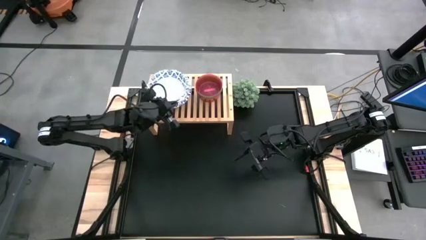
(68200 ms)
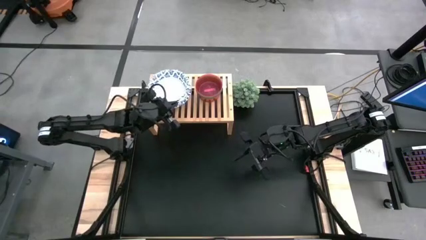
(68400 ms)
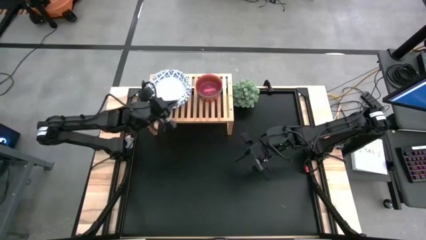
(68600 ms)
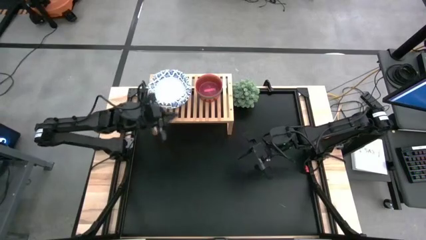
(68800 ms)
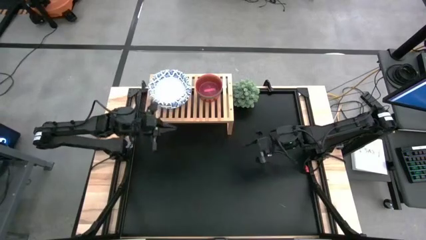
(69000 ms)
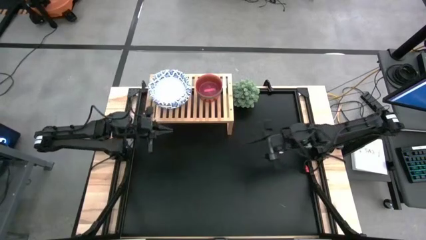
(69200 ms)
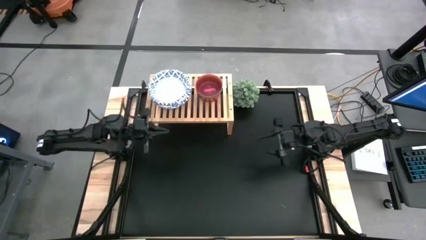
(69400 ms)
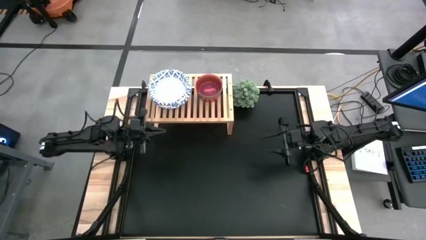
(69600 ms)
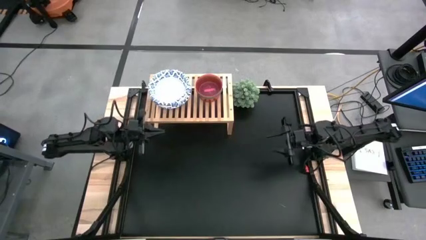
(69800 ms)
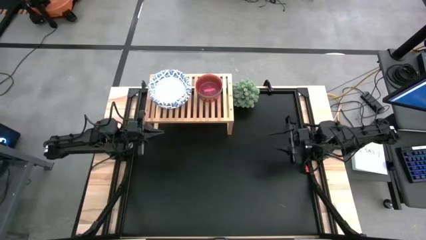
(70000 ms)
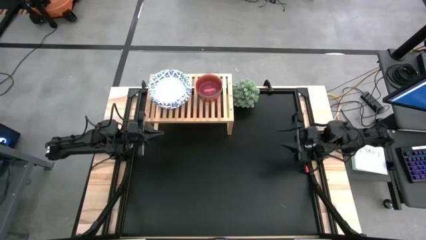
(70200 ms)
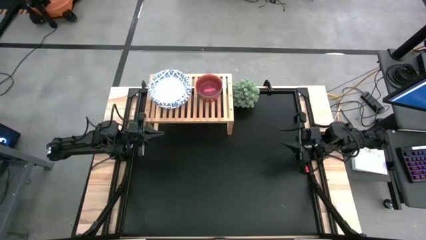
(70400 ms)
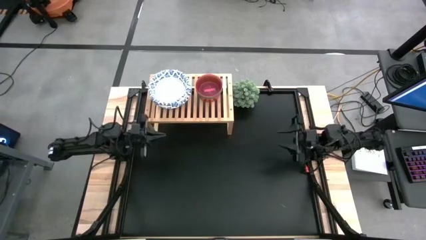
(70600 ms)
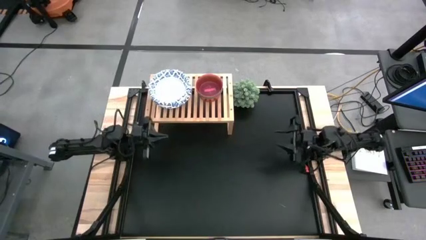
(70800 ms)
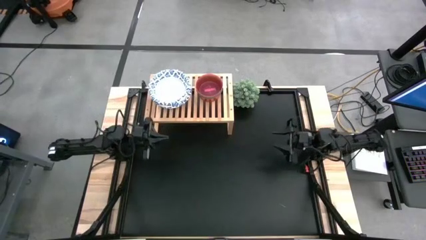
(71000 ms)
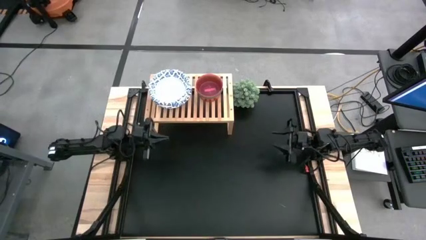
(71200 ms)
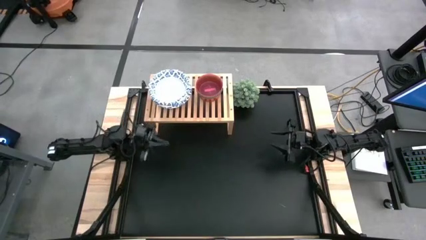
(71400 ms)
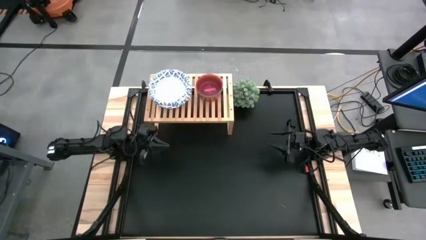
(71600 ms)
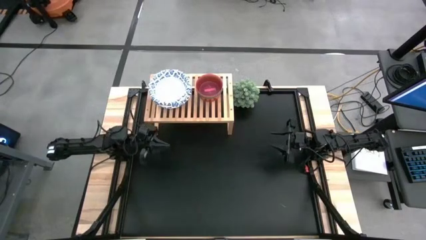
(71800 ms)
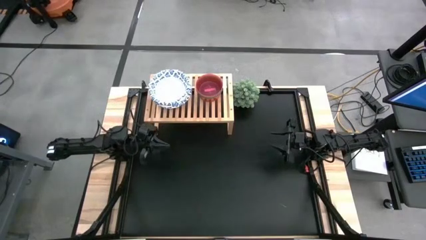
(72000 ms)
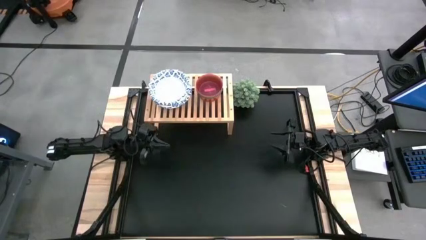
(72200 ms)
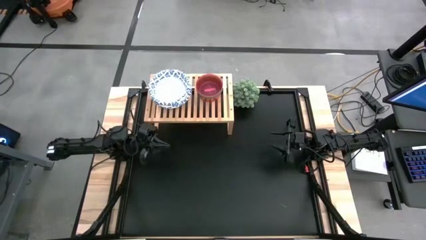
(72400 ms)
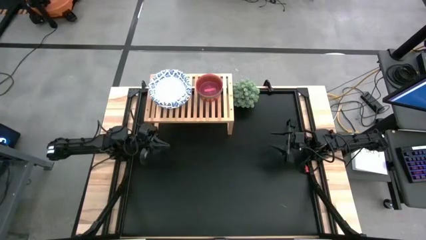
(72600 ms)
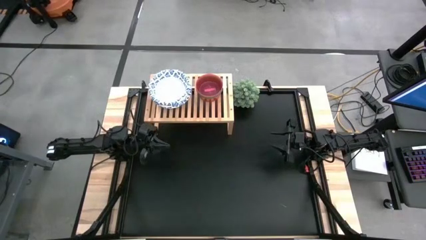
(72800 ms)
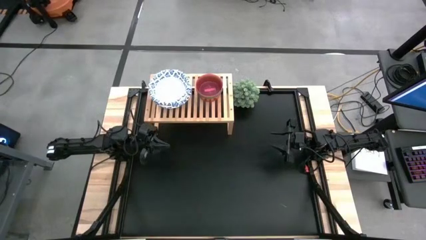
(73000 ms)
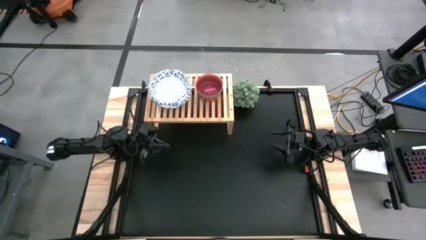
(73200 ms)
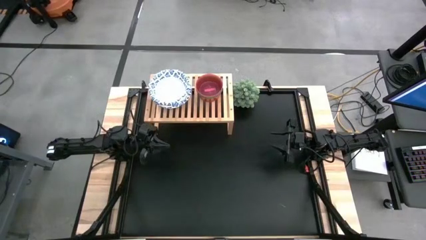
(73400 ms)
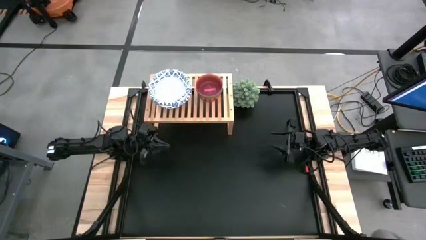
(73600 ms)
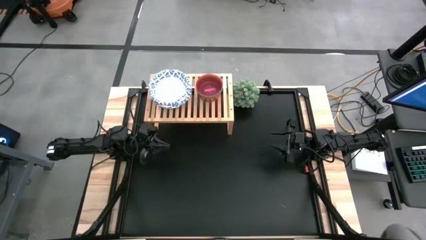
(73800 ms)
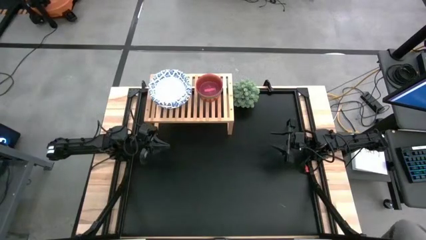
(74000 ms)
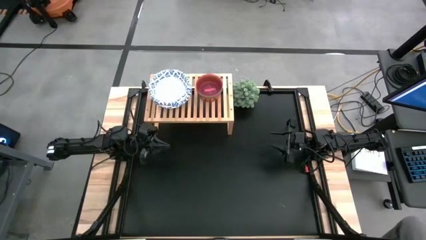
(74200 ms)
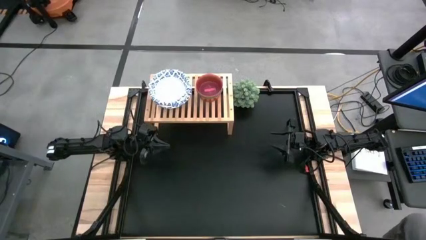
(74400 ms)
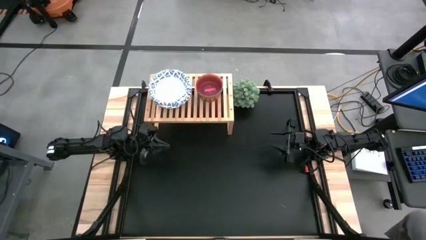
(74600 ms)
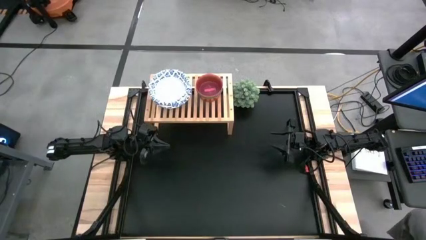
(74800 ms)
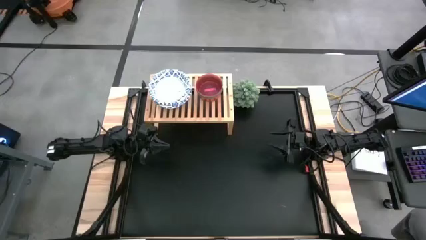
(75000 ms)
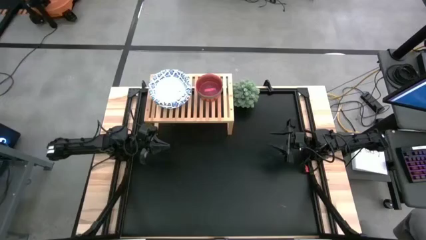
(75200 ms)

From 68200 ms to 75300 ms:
Task: Place and stack bowls onto a shelf
Return to Home Position

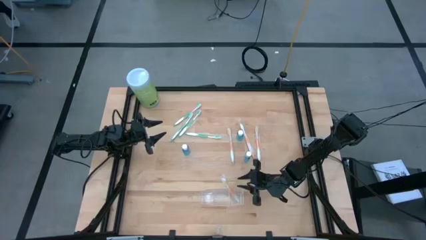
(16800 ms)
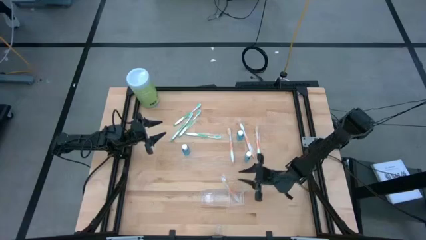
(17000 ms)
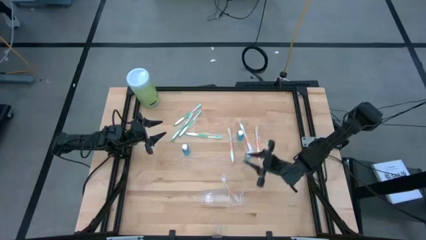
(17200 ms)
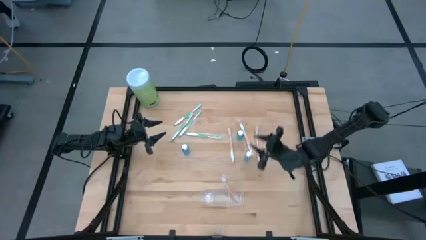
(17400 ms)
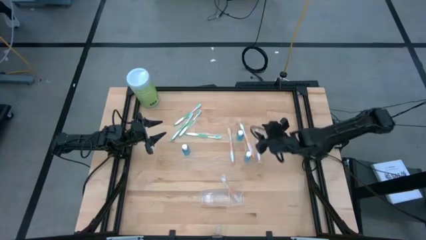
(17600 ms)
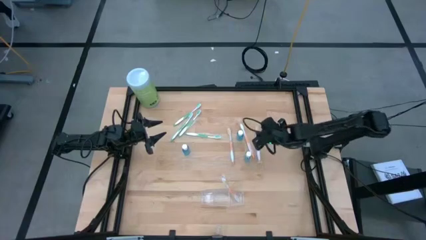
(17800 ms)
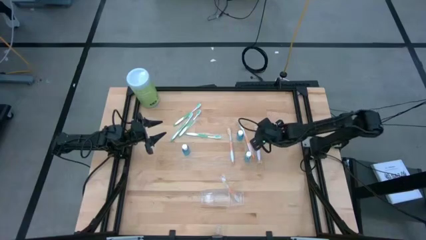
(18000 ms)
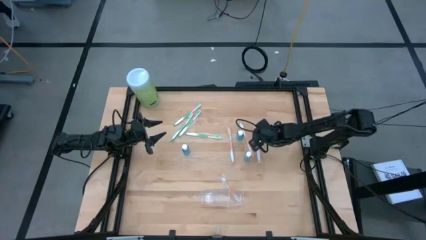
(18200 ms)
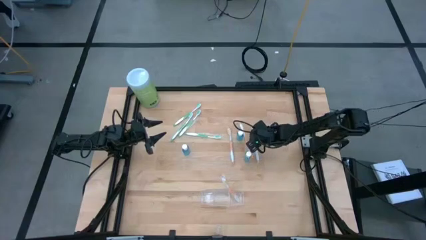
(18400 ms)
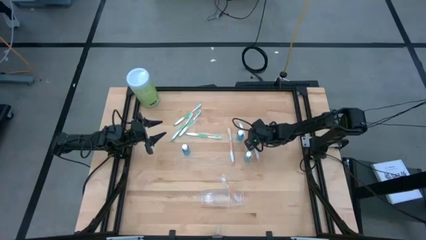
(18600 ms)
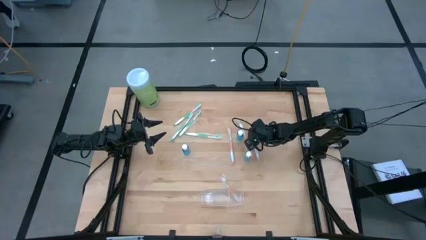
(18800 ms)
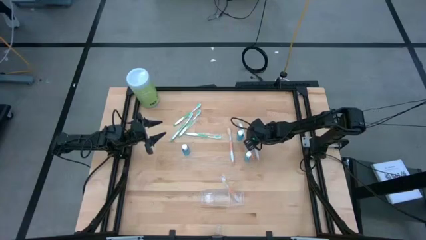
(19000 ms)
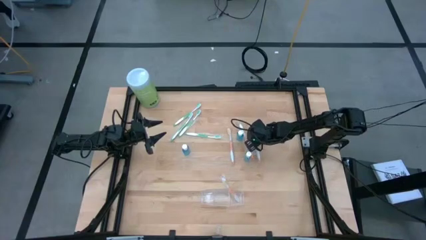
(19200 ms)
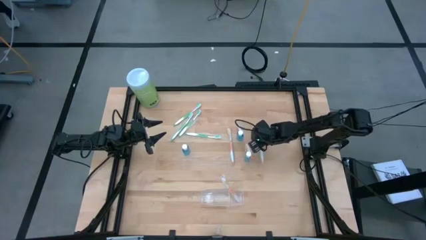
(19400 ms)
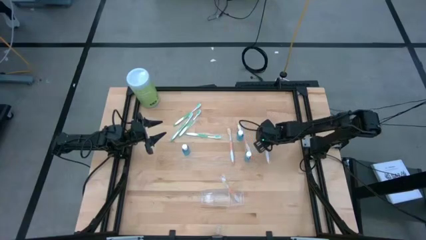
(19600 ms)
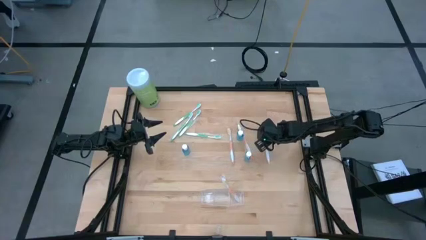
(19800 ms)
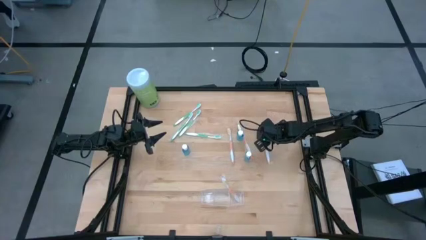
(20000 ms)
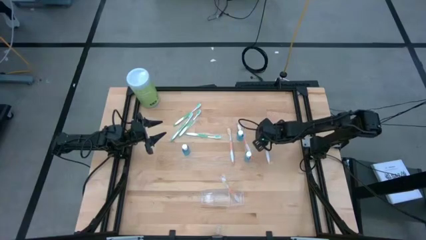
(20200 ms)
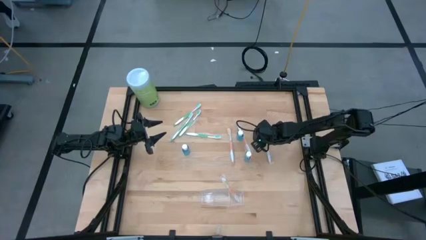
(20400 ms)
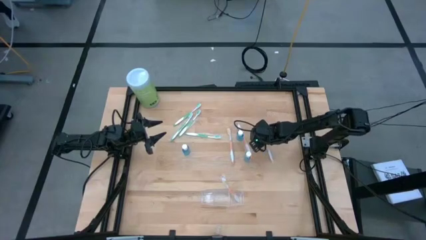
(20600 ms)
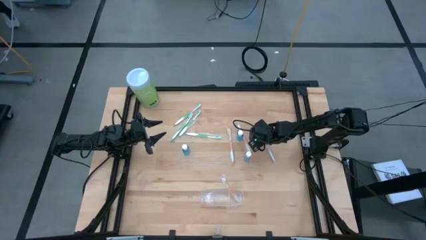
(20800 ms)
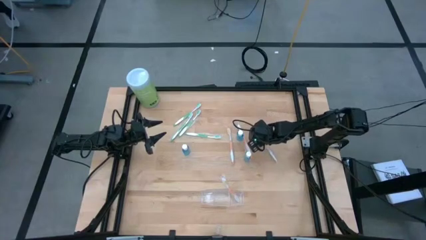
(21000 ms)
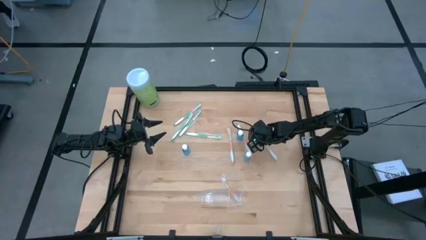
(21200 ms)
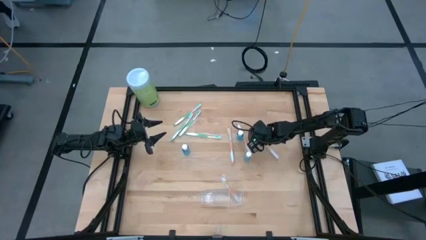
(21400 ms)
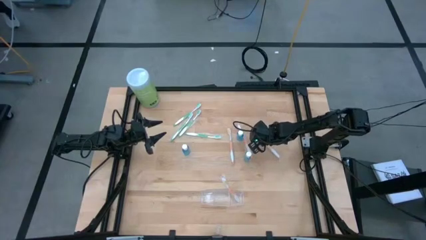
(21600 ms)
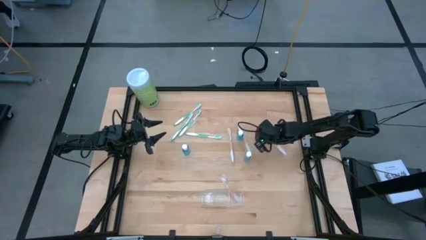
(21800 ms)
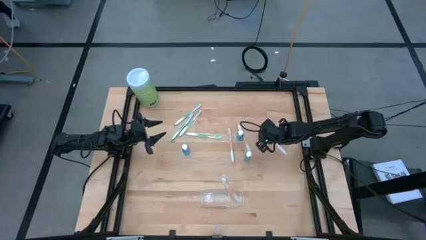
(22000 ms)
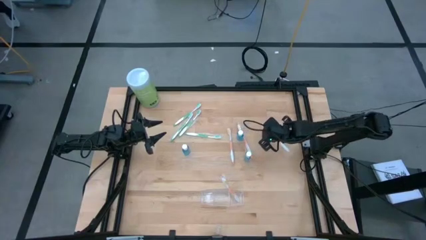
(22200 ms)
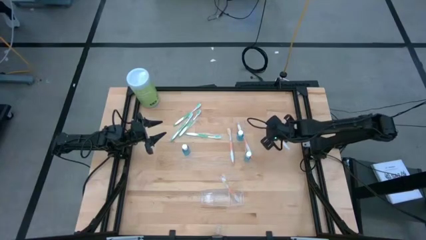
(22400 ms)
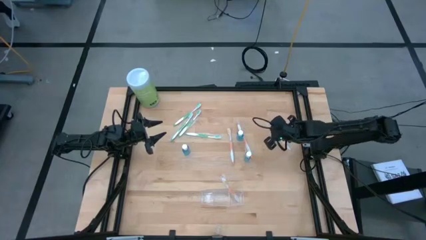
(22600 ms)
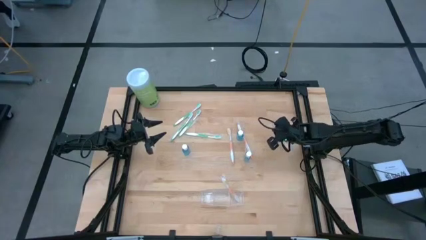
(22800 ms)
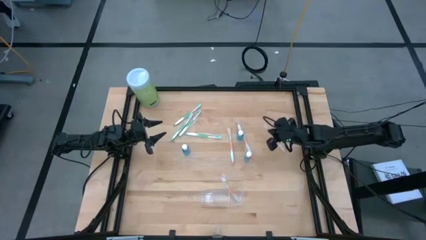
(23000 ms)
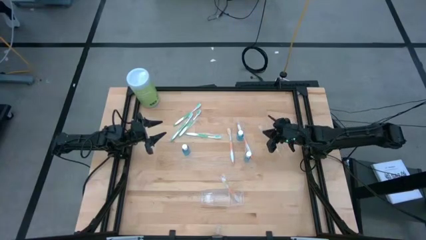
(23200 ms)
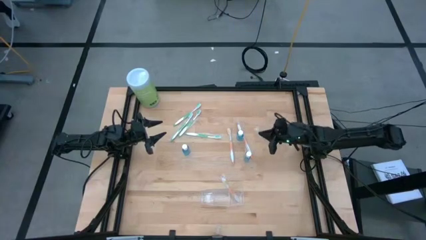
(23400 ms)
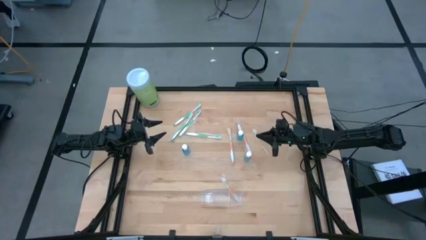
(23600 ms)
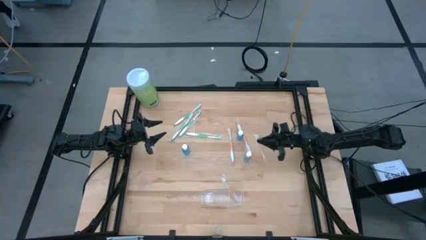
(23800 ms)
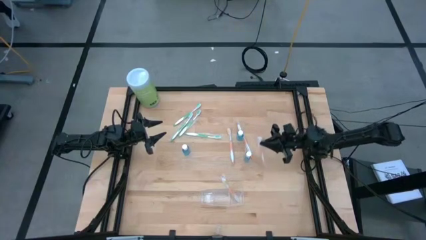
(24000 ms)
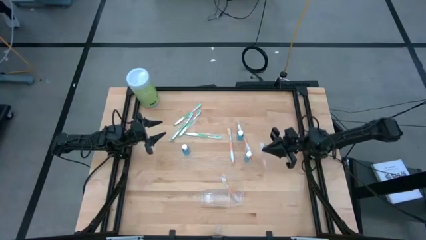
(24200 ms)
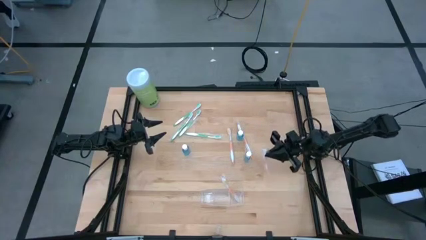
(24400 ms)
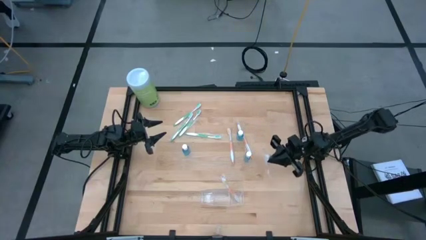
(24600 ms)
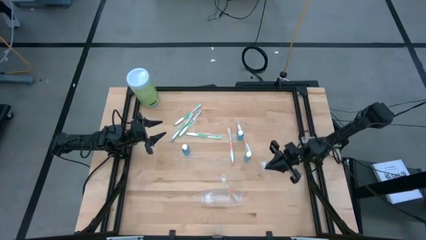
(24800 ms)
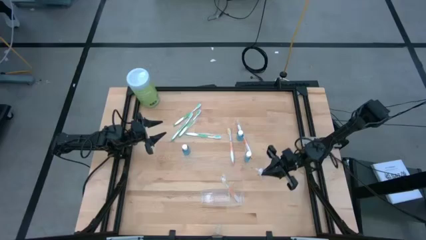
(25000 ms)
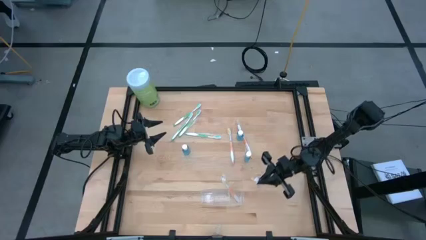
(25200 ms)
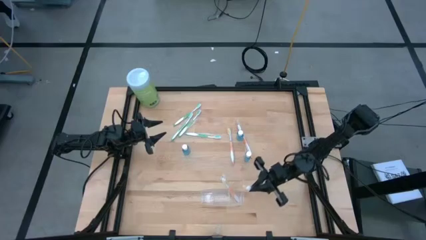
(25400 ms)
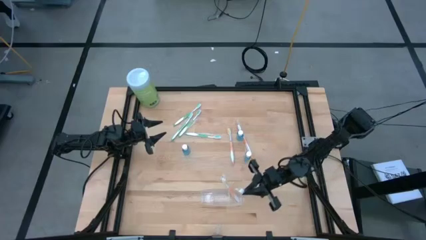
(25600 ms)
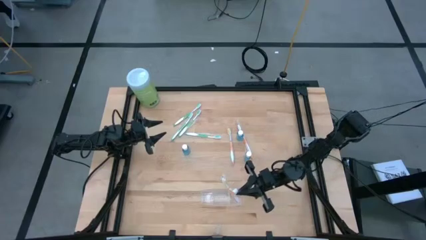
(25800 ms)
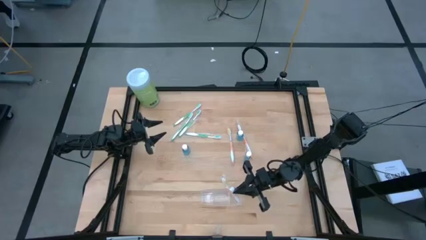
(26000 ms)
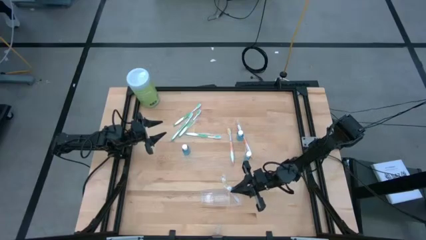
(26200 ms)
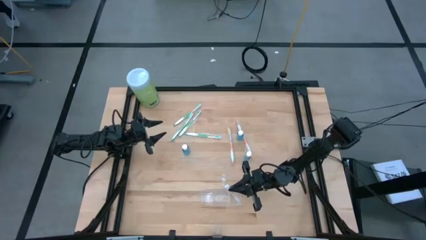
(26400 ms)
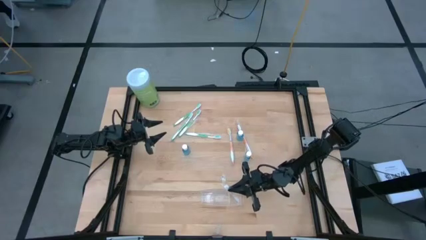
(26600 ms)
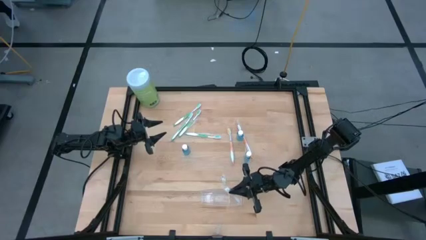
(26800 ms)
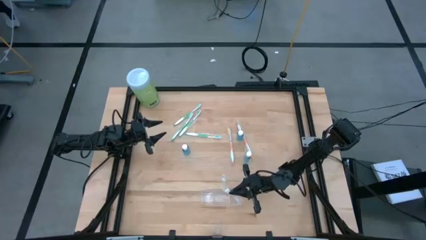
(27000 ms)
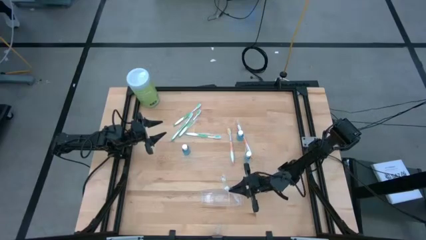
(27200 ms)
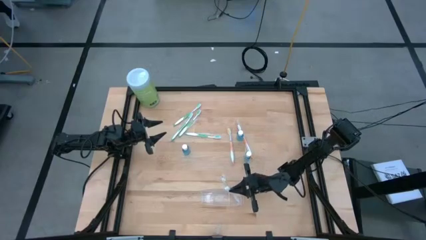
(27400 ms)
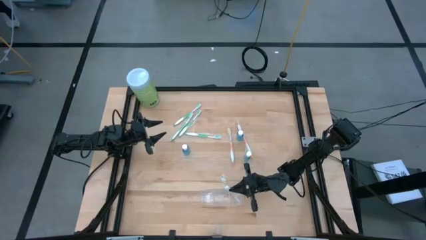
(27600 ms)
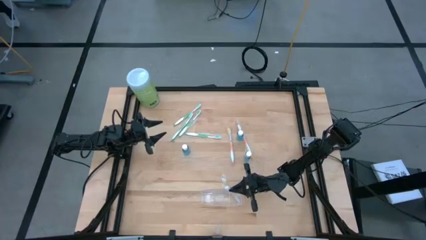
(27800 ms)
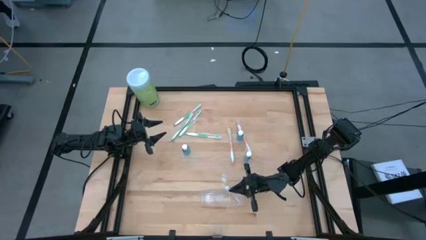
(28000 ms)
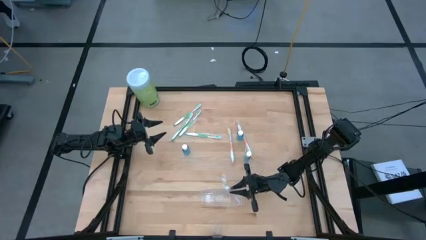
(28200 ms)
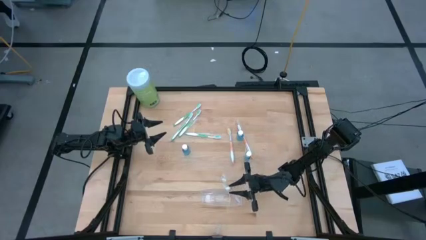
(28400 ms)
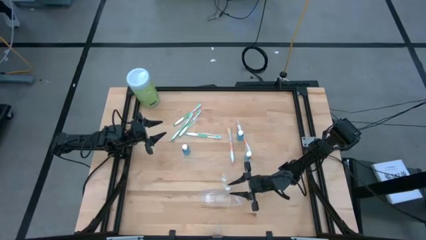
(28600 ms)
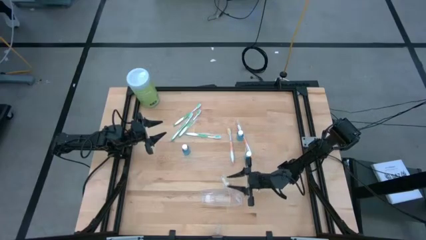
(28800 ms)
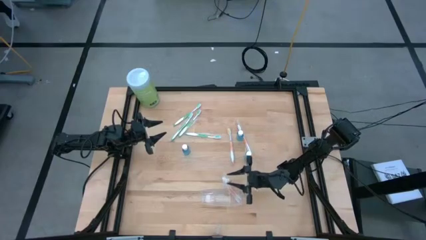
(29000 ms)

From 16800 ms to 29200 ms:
Task: Pick & Place toothbrushing station
Put the orange toothbrush into the transparent organizer
